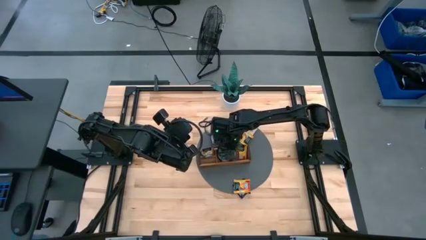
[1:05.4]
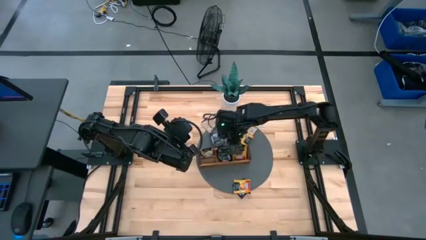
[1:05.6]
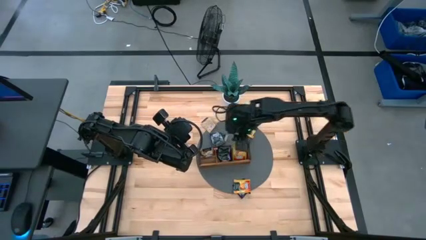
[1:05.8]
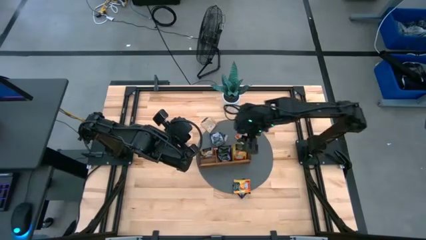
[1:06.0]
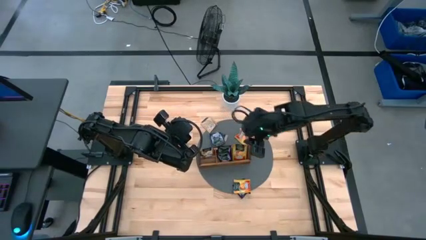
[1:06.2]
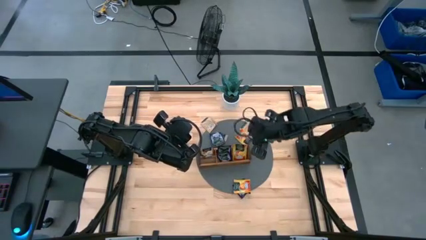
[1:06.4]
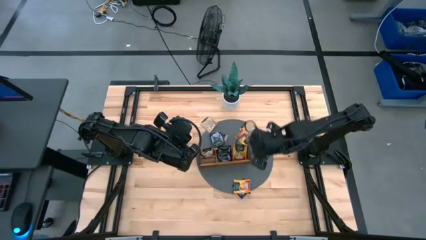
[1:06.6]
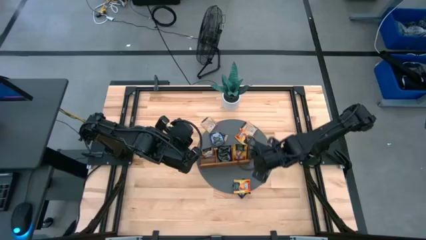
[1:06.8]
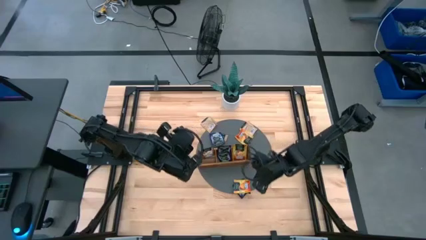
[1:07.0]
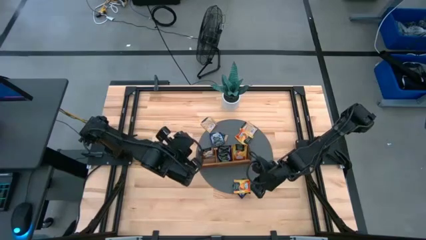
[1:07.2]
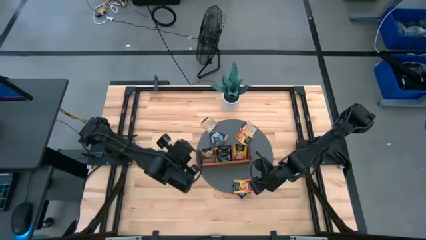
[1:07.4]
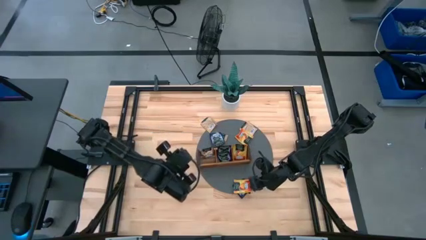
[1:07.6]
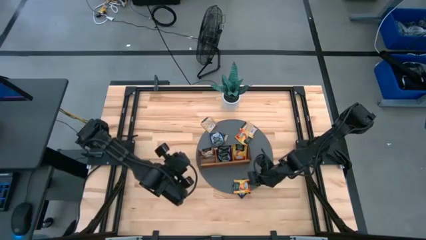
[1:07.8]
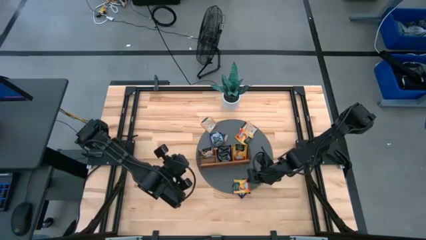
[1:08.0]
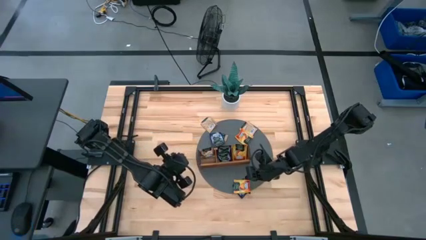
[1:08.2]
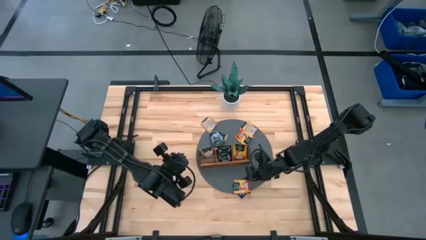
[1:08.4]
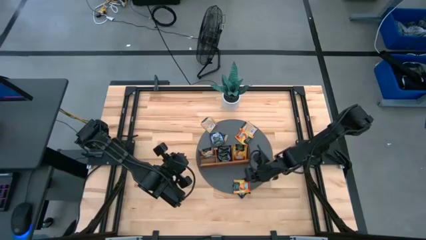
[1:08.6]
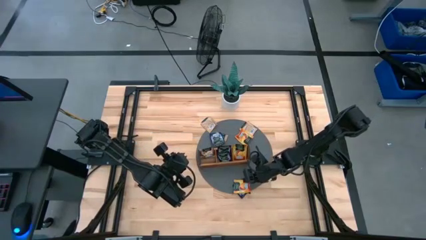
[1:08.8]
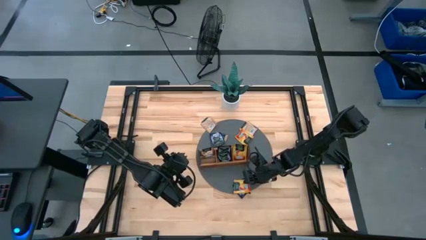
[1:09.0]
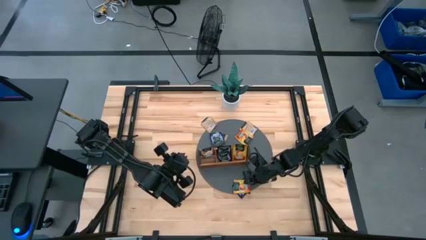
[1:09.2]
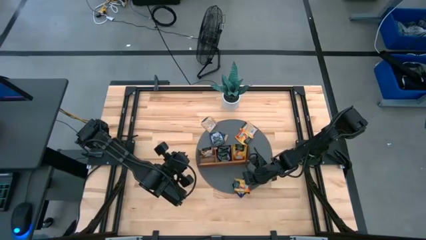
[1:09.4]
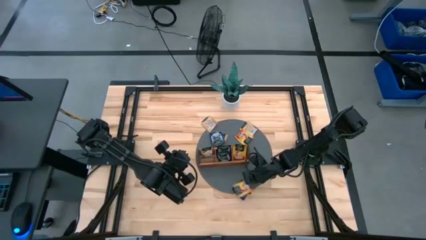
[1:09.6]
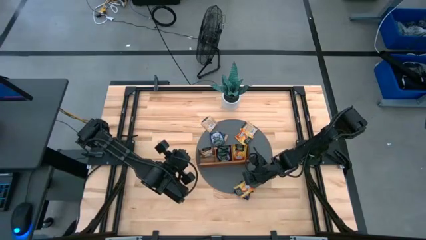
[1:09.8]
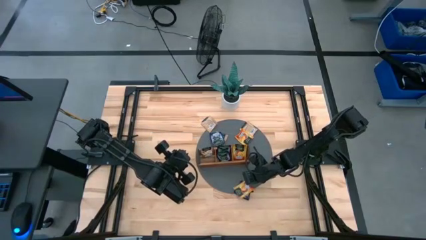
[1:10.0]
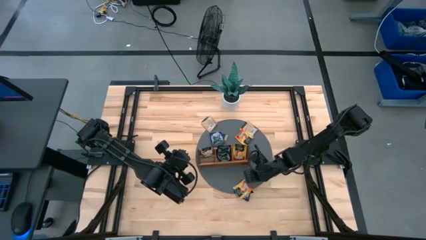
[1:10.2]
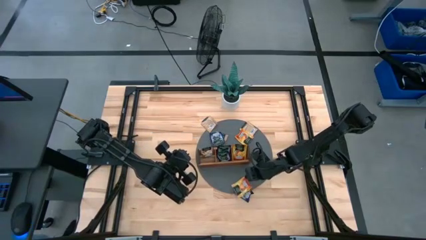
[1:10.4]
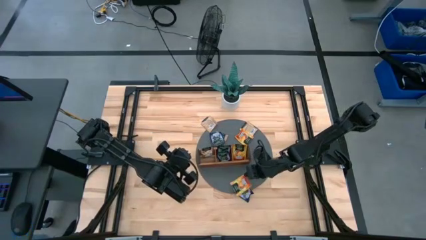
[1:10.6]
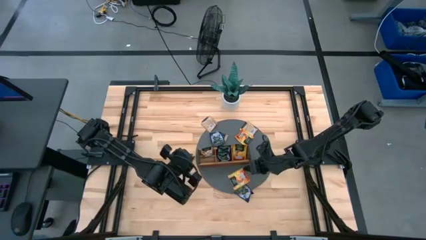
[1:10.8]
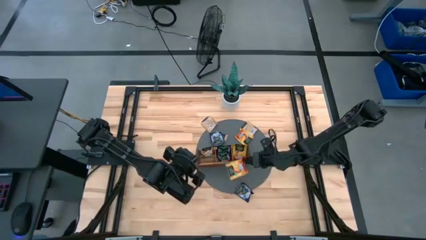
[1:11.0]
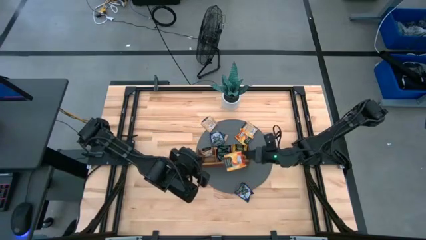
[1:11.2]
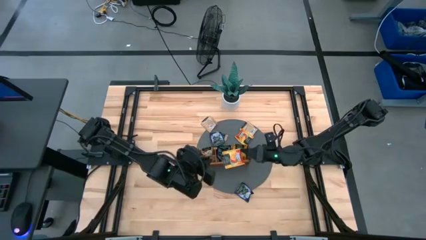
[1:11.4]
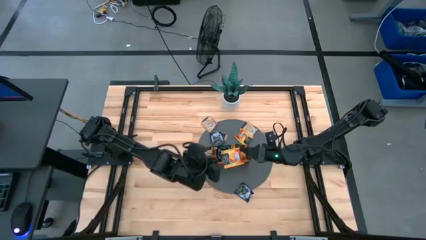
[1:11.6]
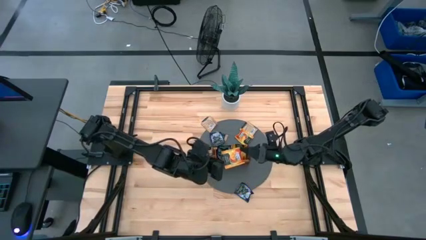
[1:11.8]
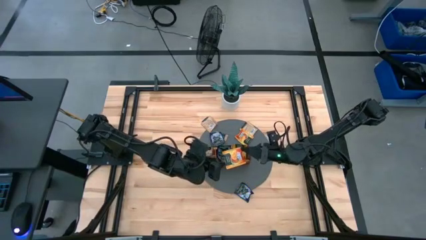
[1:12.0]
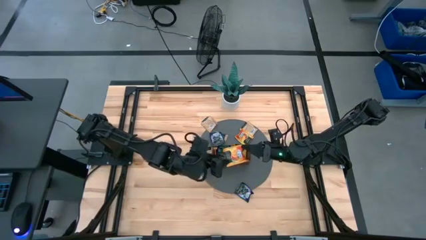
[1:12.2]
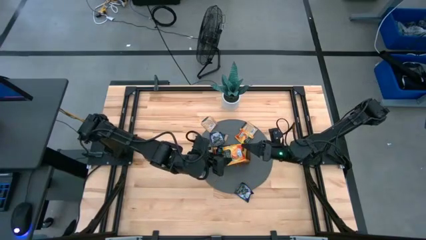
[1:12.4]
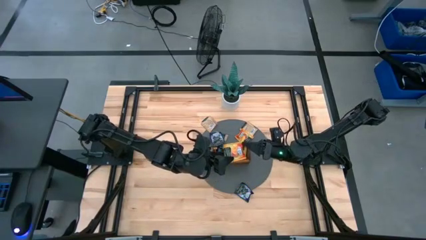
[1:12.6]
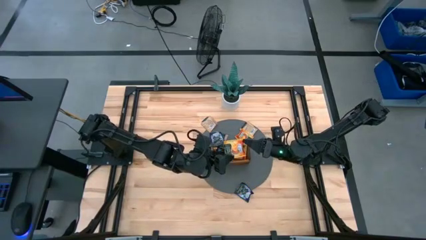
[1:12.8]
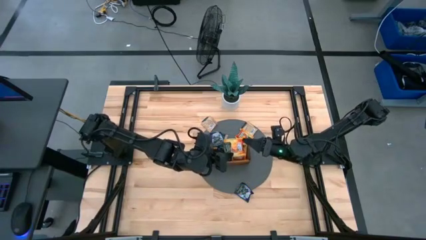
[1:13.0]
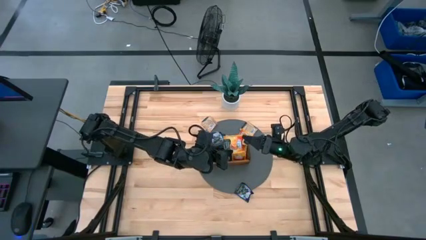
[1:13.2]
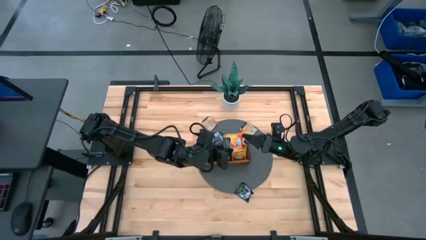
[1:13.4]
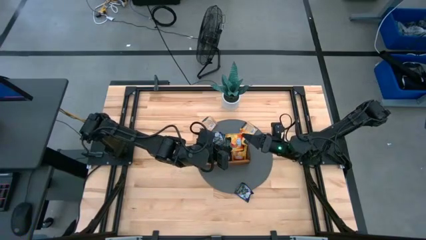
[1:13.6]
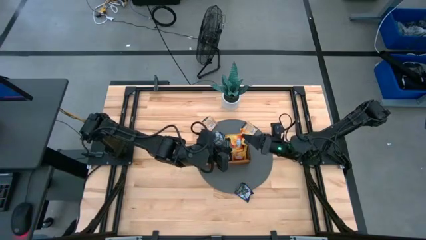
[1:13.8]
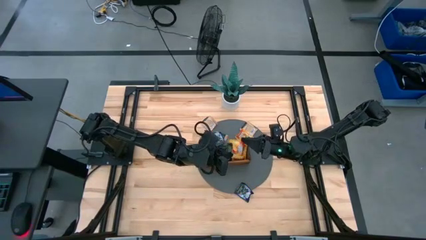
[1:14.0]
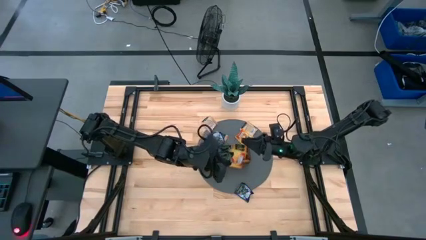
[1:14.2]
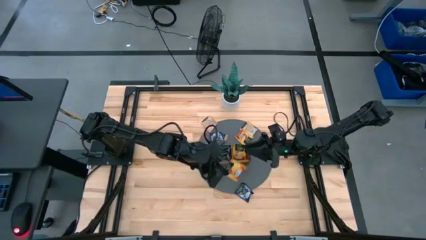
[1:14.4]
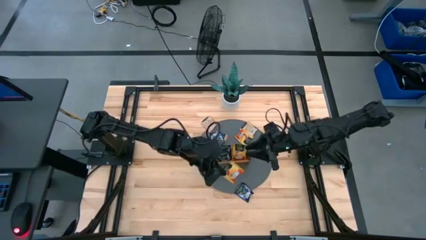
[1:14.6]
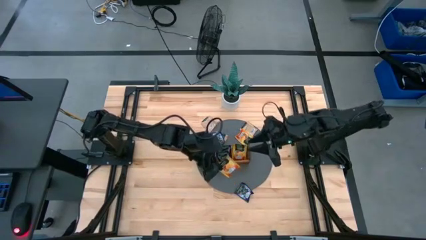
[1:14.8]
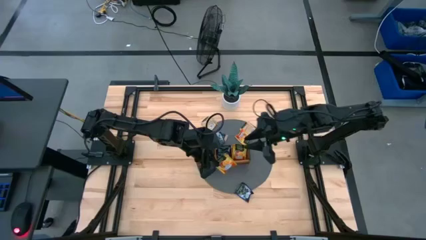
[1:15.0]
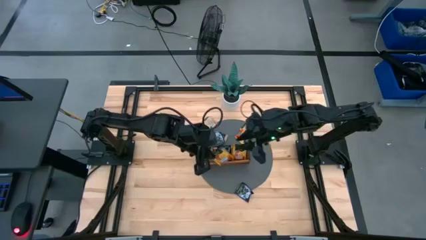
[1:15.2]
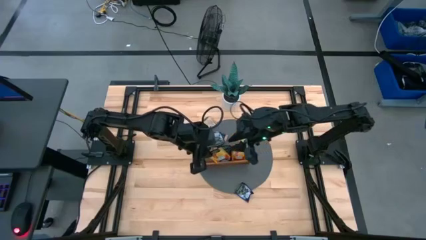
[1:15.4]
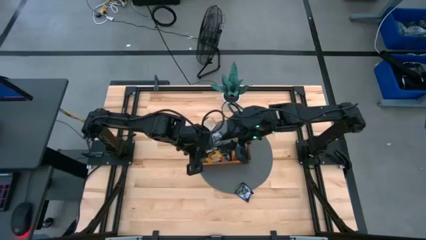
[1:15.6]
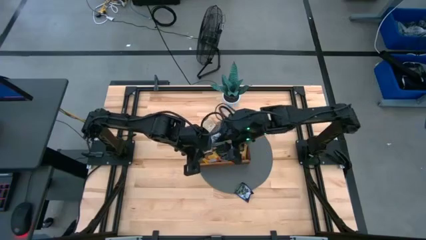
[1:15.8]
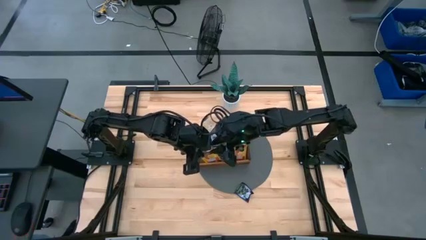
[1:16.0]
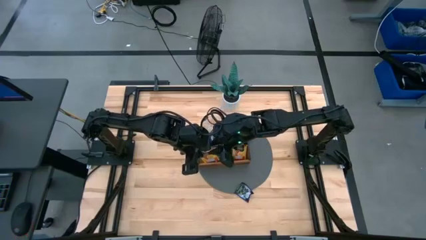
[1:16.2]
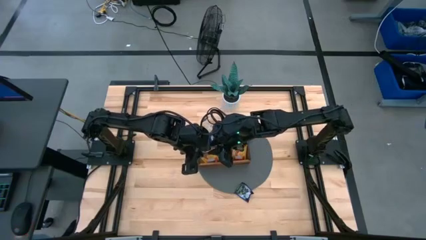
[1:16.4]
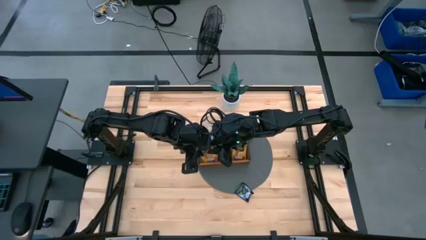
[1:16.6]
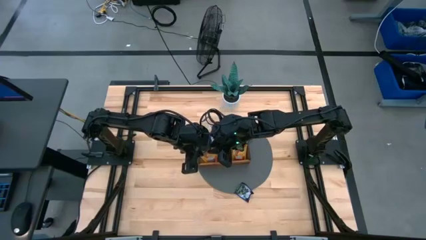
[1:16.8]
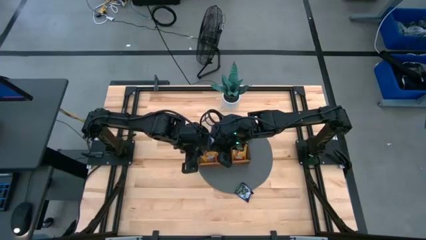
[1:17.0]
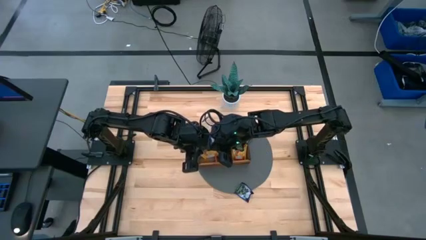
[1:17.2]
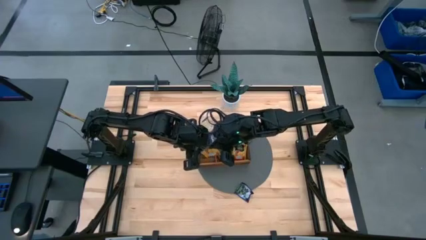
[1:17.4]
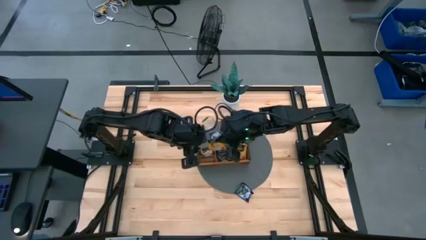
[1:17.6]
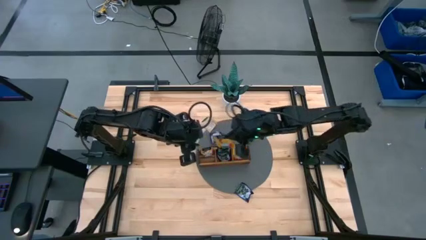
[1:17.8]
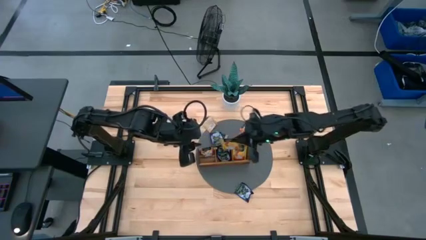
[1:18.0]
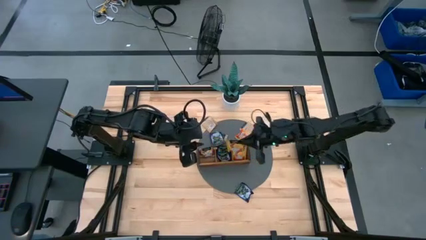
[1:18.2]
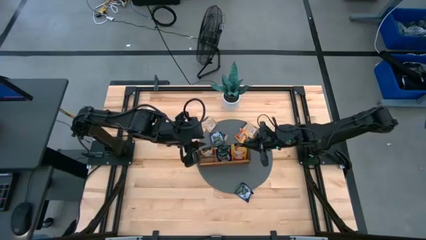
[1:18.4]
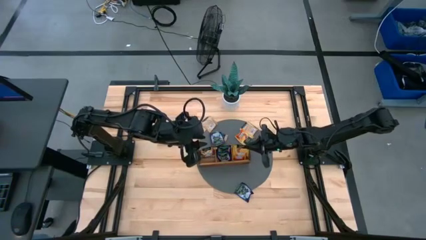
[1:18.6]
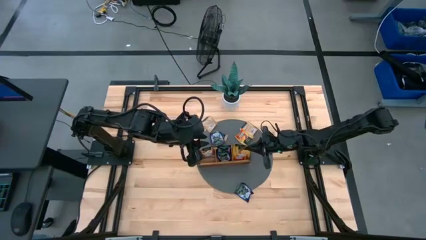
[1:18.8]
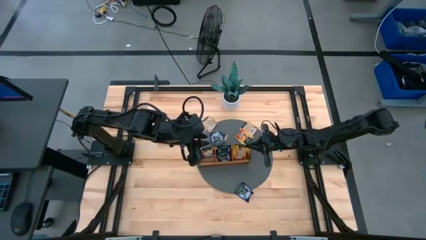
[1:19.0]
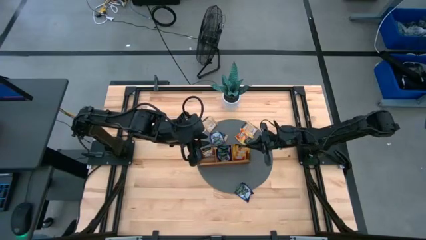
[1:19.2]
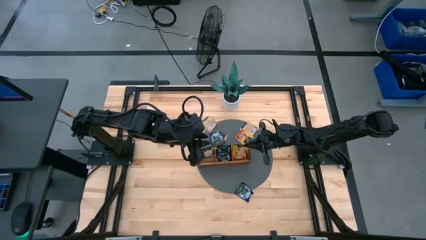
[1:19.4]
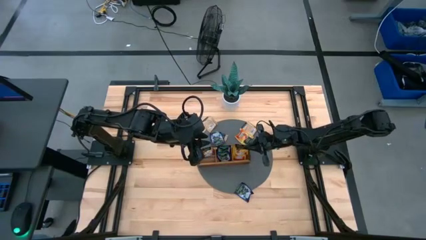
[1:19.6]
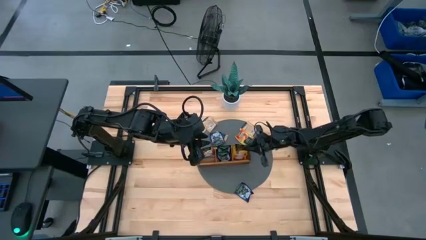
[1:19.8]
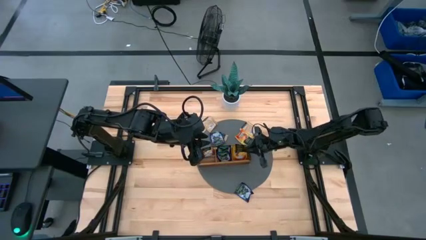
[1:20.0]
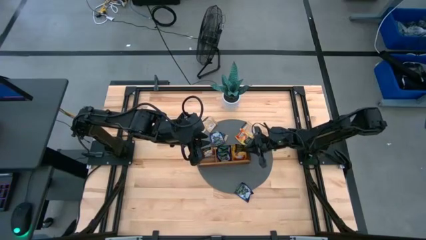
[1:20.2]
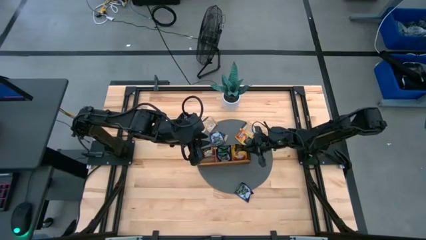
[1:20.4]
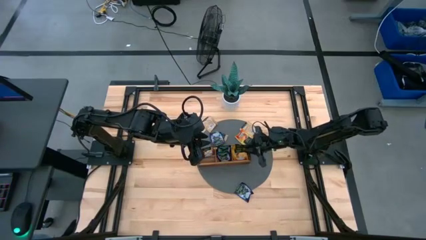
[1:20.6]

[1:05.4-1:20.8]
Task: Pick & Place Tea
Put the yellow tea bag into the right section of the wooden organizer
